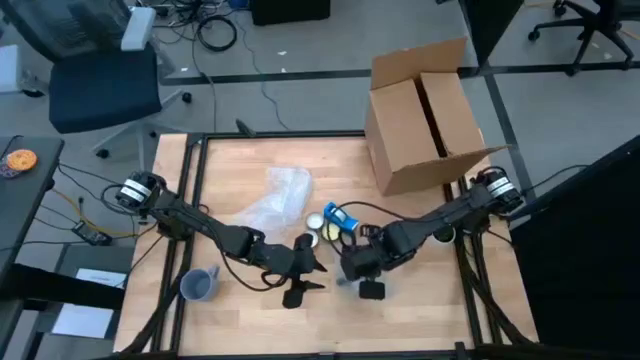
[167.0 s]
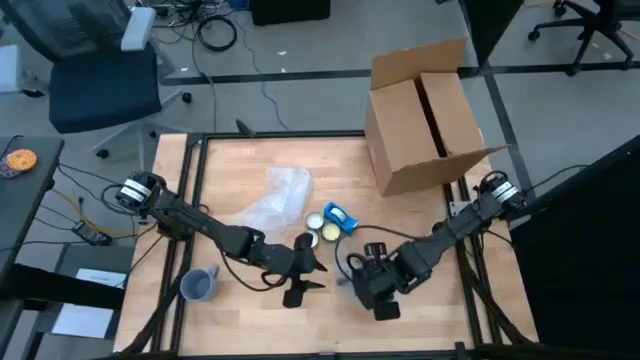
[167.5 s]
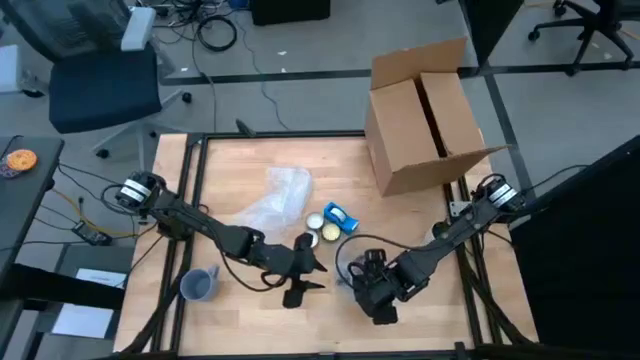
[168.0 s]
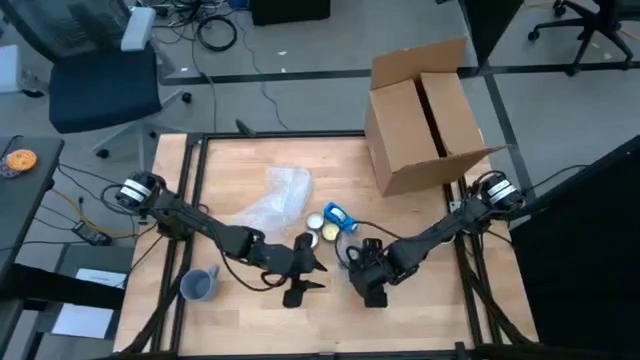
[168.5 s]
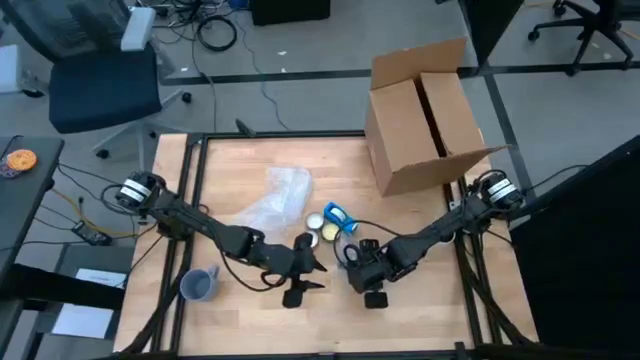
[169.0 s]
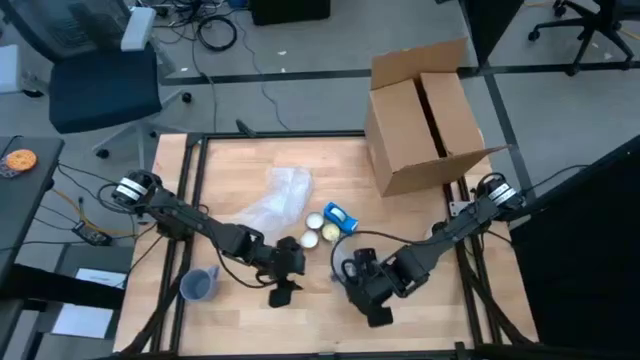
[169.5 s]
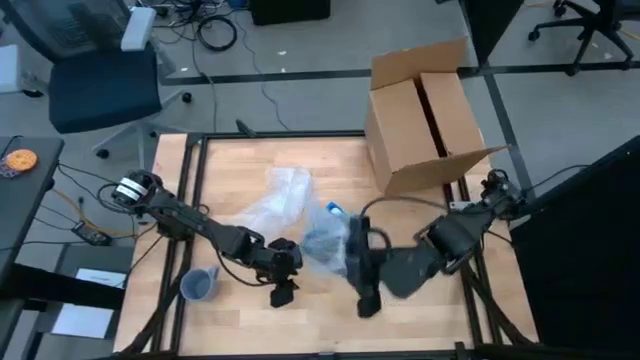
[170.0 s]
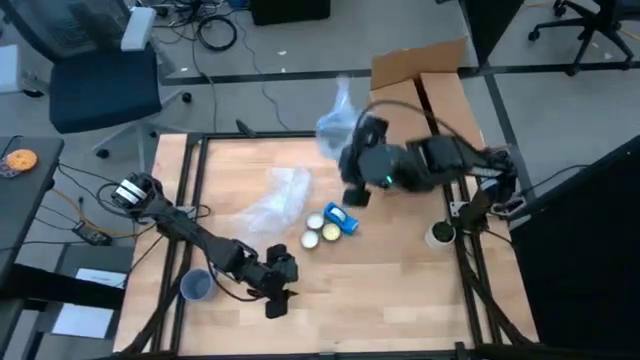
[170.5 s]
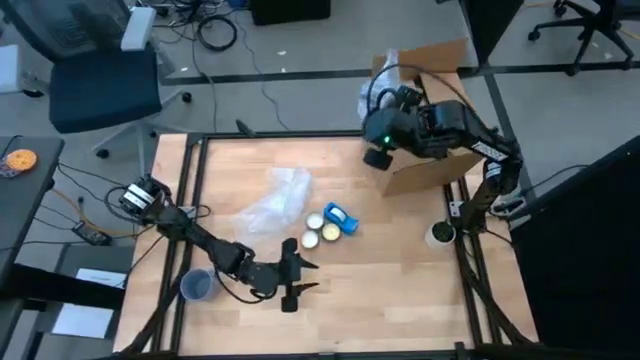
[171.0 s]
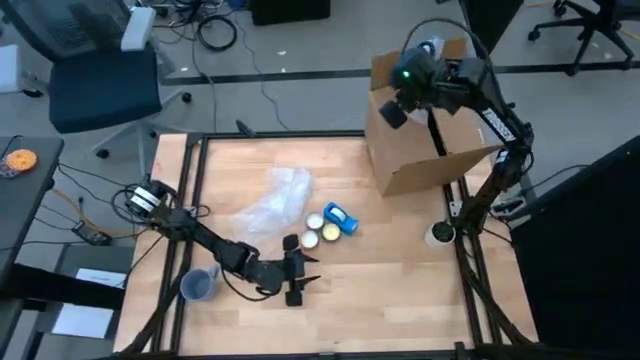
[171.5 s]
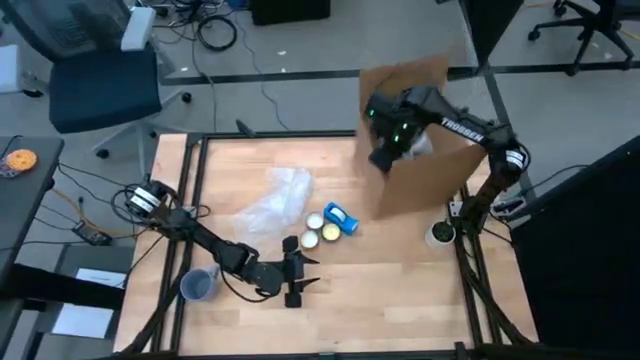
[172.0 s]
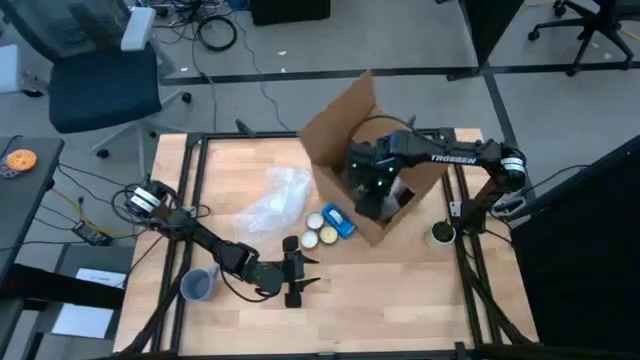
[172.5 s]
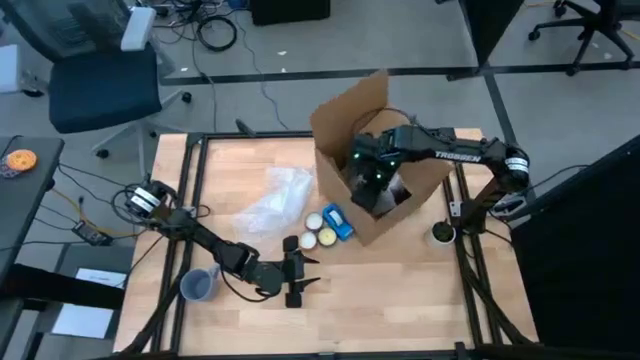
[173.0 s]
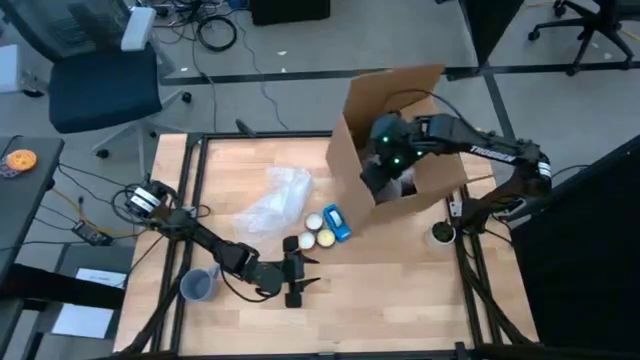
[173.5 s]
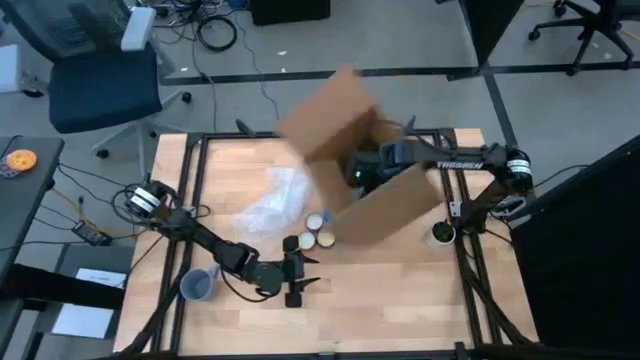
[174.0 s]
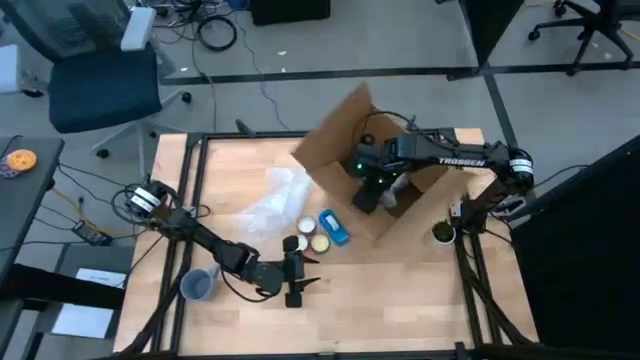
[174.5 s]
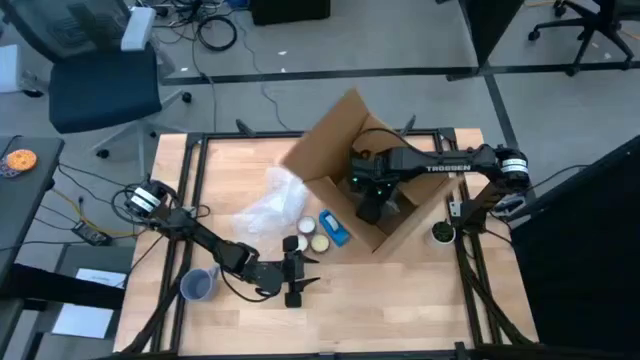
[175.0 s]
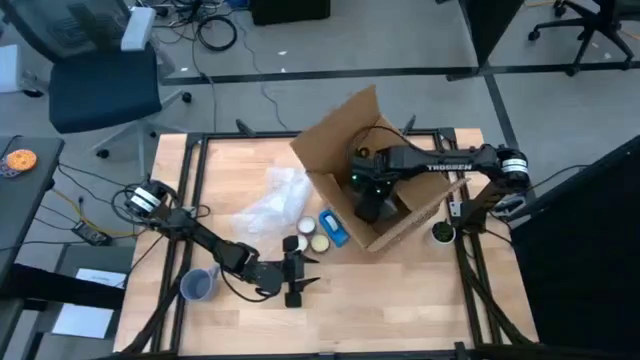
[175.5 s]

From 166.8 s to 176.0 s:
Task: wrap mug
Put the wrapped black mug into the brown cardboard box

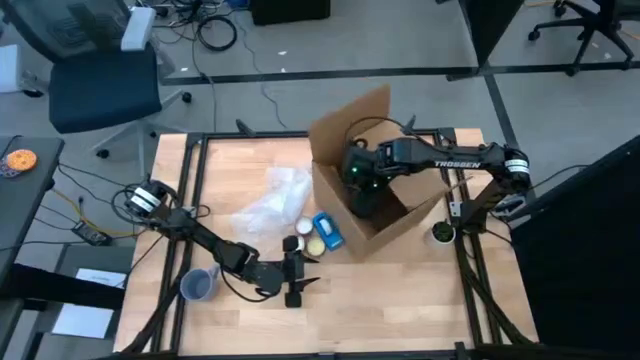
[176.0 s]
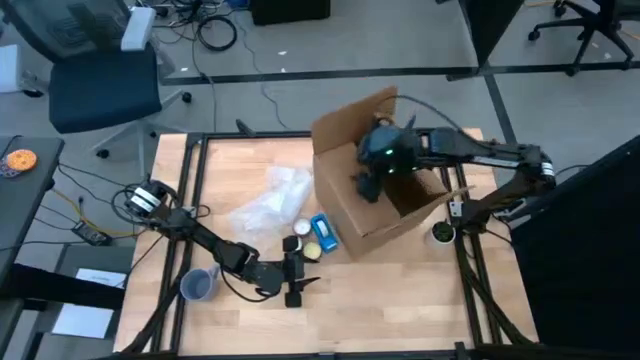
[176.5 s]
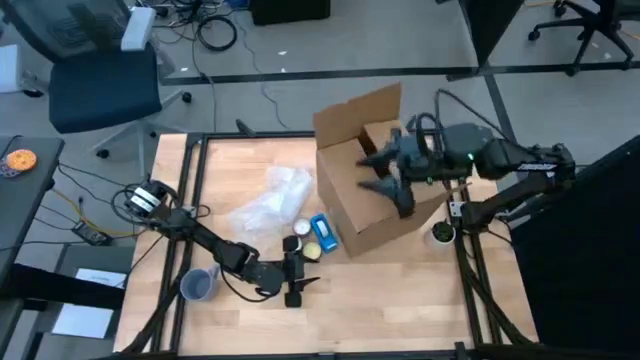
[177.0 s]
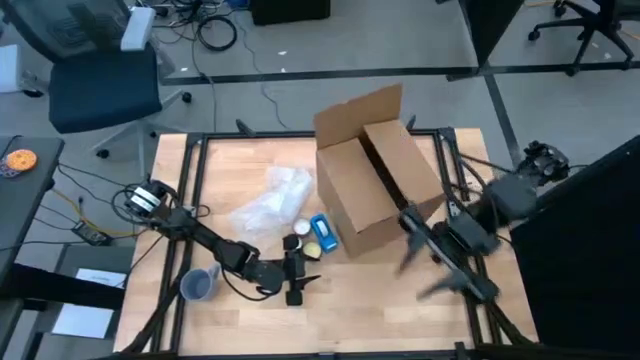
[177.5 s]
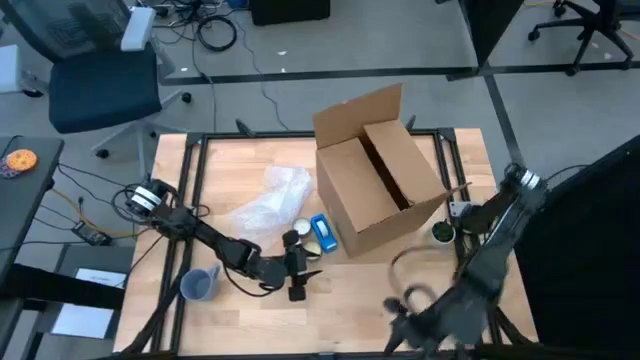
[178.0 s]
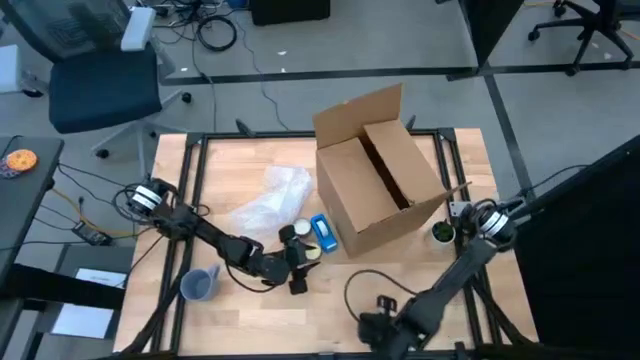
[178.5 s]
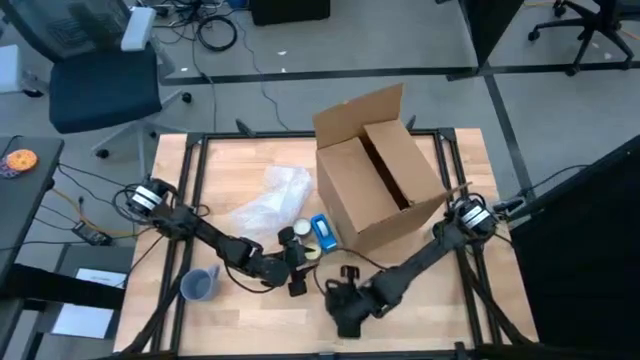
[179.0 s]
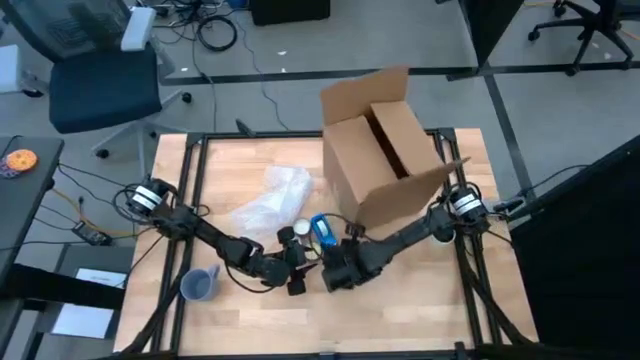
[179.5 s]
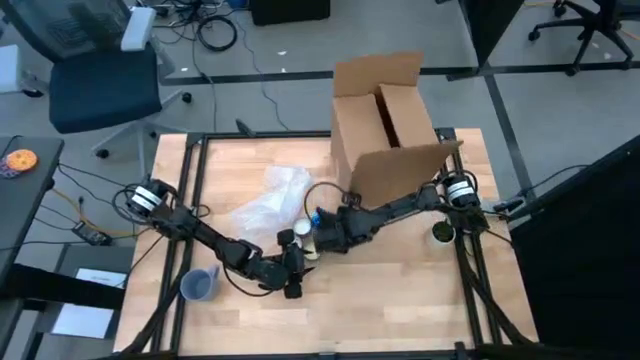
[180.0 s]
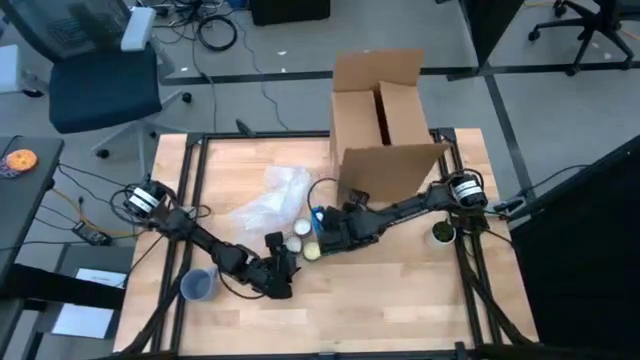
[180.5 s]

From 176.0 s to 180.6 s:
Move the brown cardboard box to the top right of the table

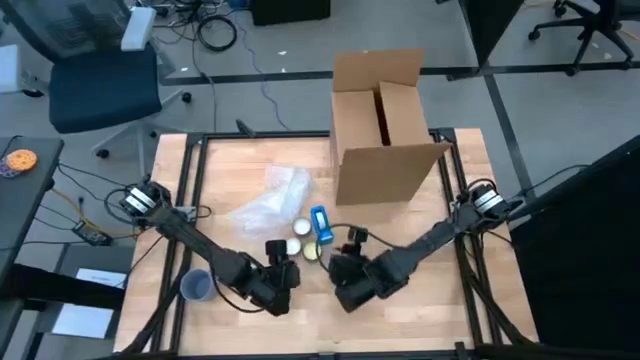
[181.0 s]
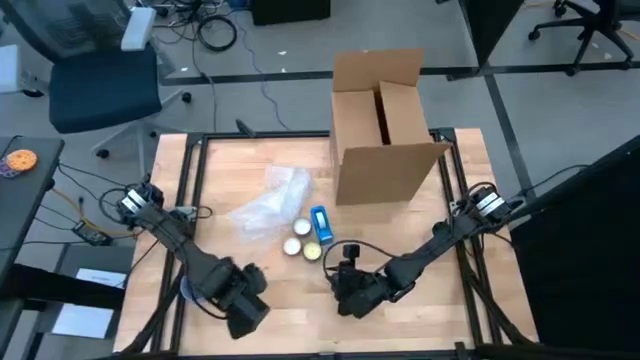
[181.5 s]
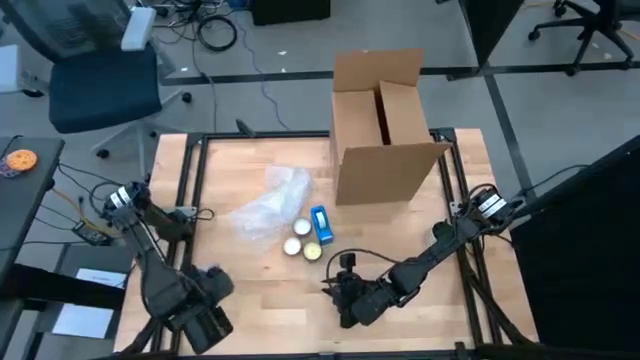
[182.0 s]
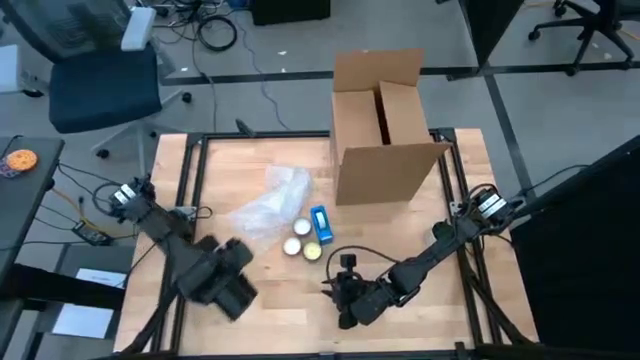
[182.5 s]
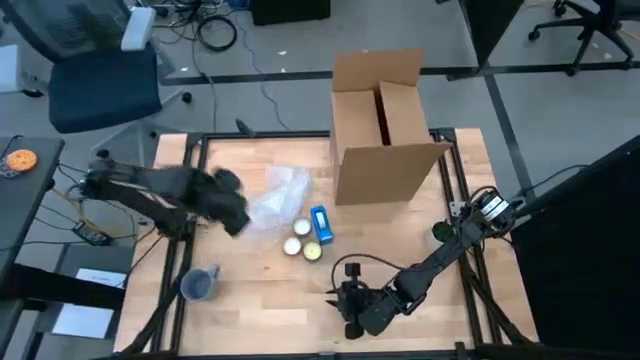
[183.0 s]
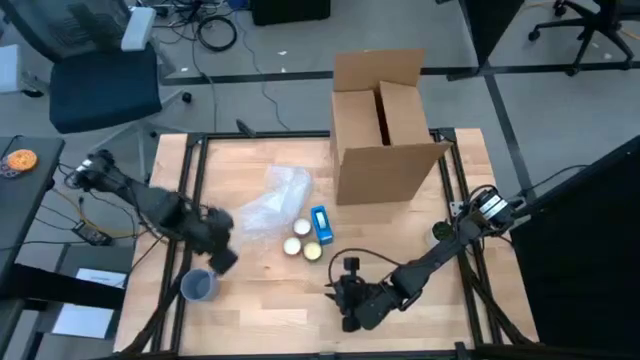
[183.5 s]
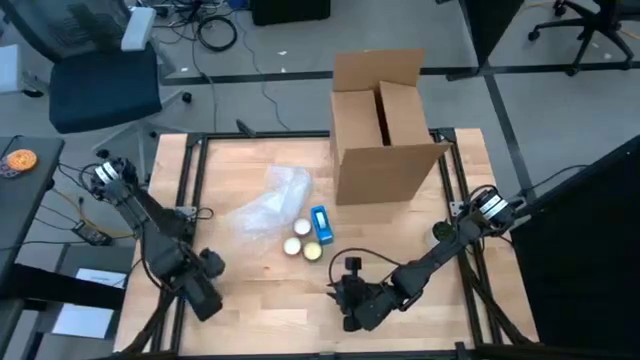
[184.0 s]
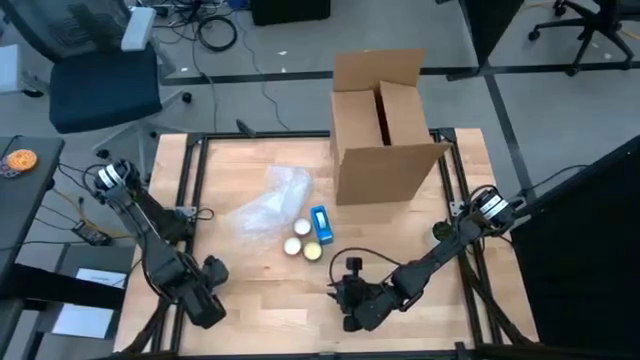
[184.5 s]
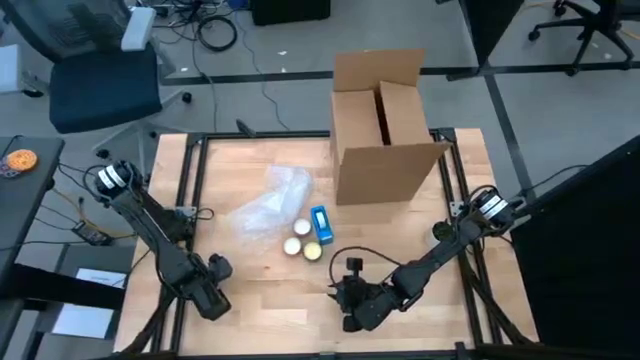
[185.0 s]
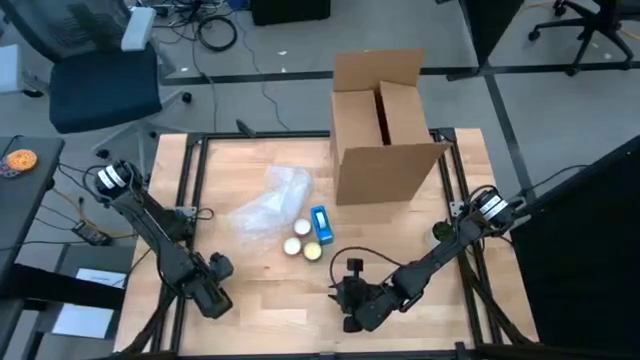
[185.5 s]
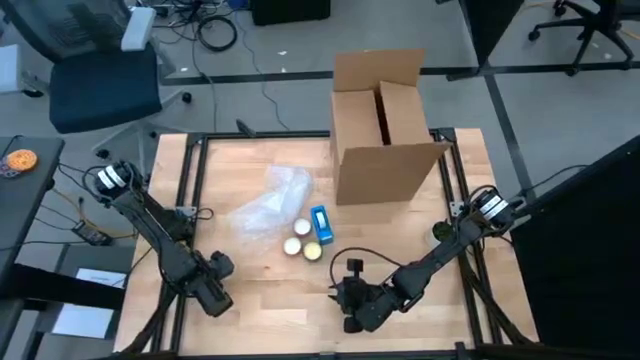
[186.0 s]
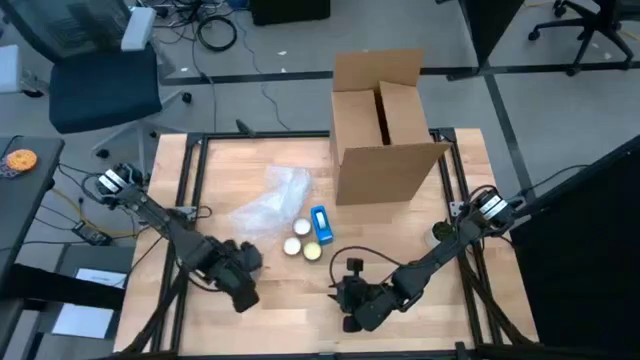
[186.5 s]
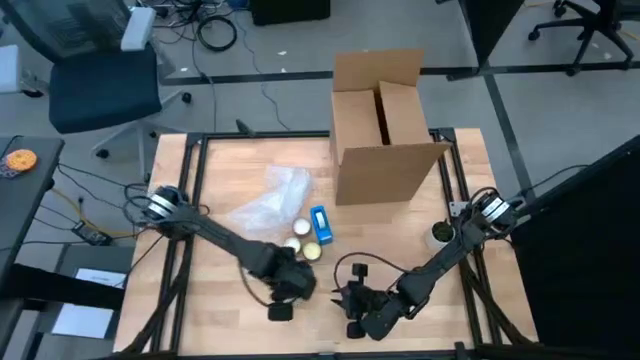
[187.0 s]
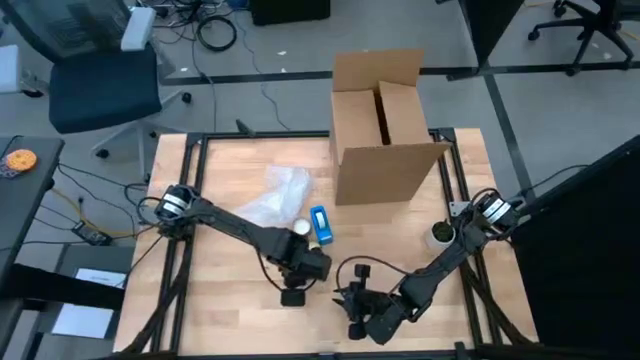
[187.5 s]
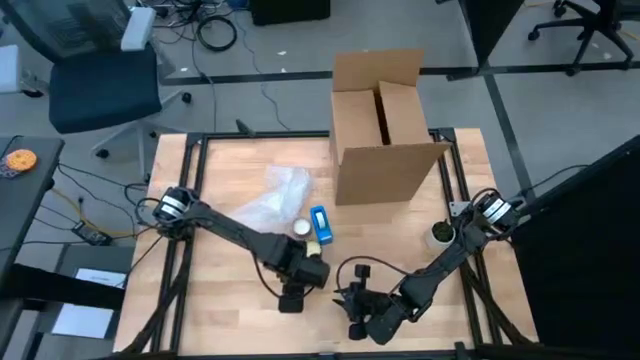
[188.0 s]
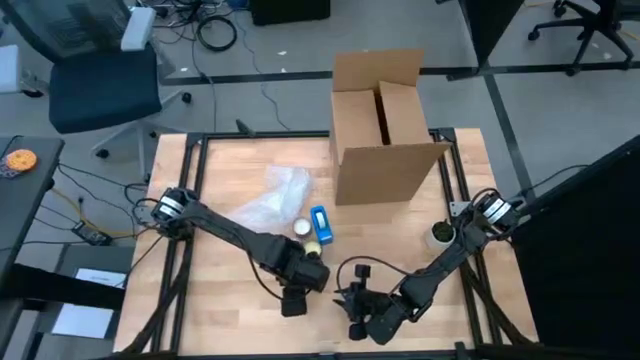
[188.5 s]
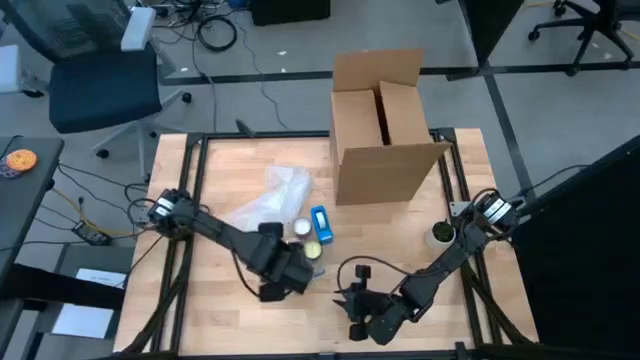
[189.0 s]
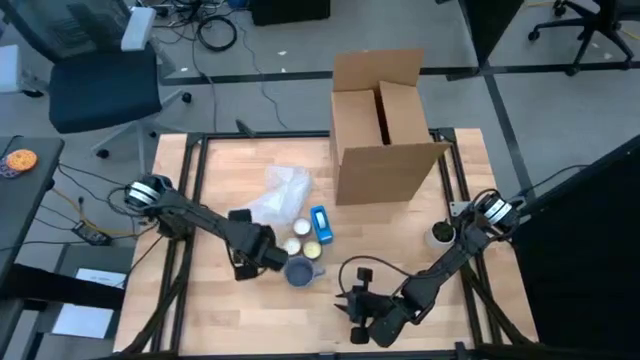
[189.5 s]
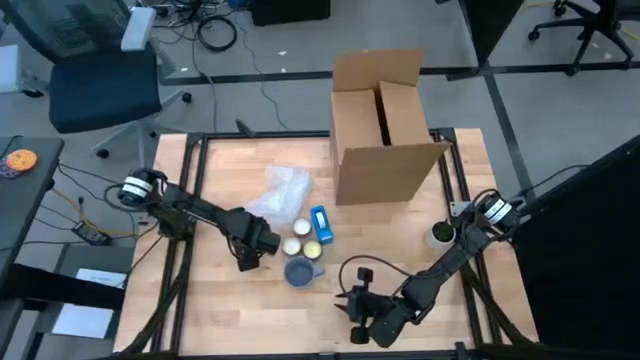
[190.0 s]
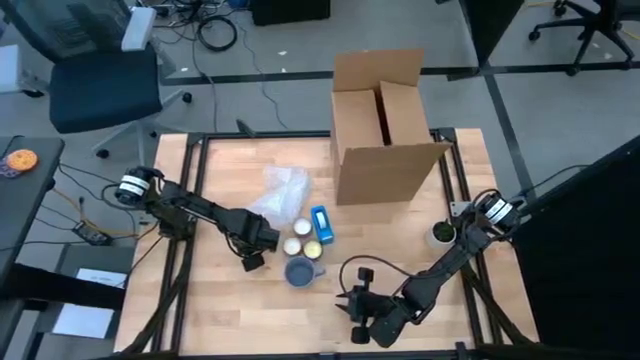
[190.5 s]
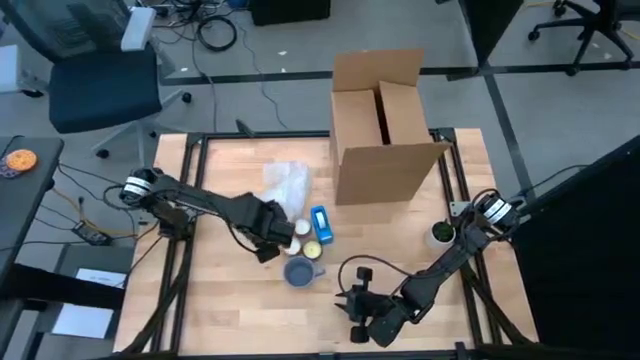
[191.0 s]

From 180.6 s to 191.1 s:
Wrap the purple mug with the transparent bubble wrap
